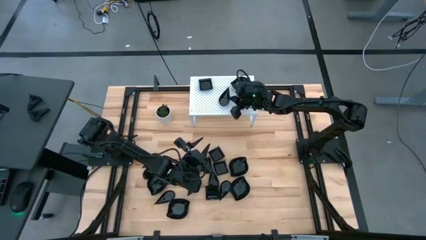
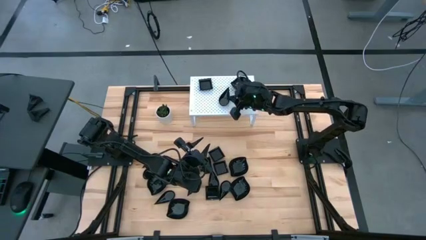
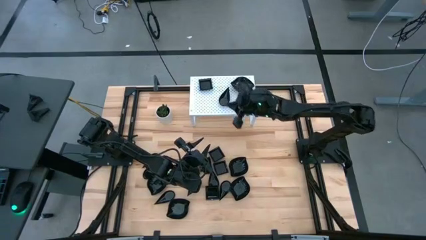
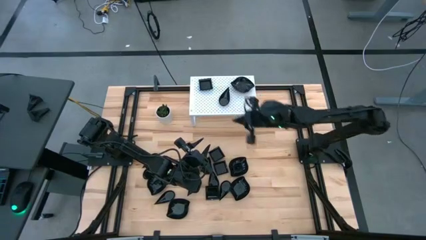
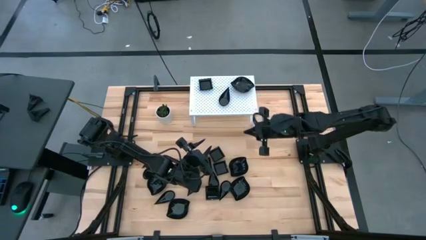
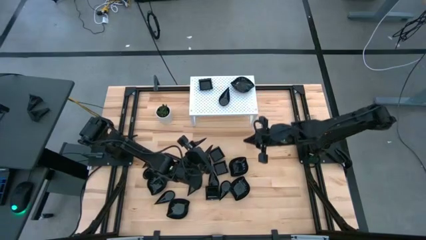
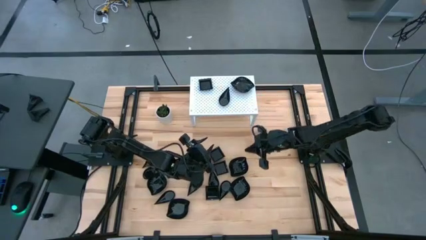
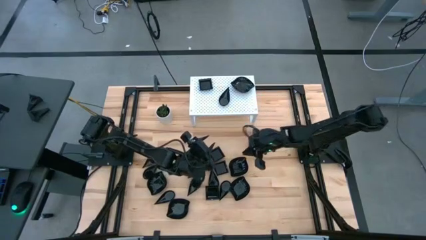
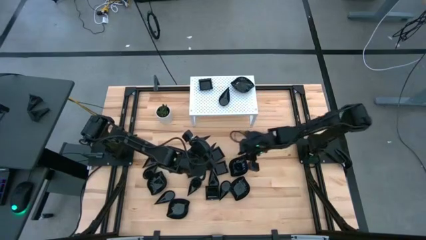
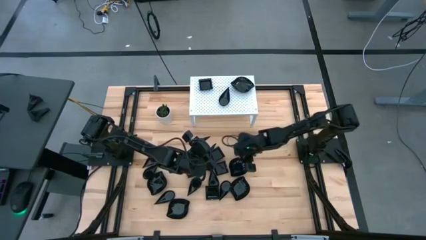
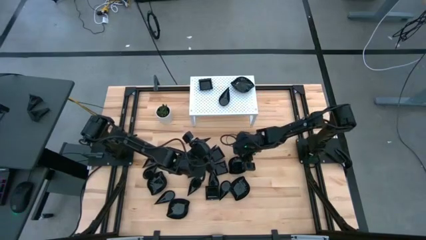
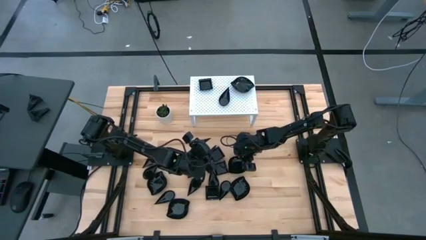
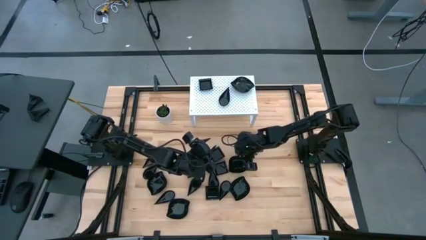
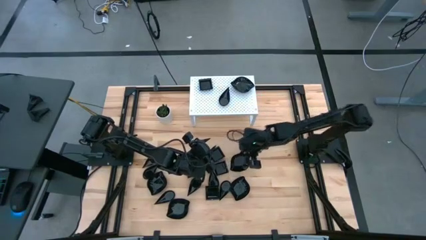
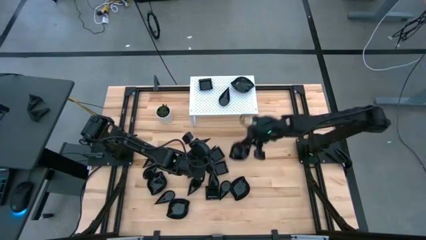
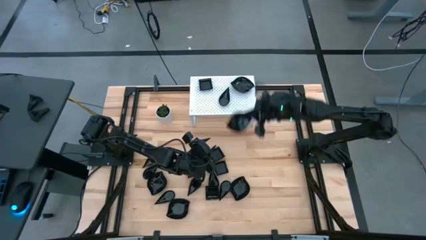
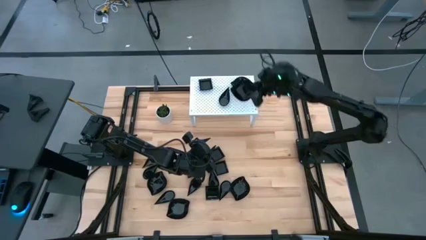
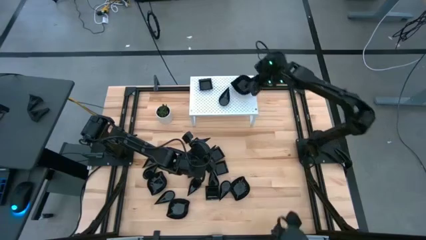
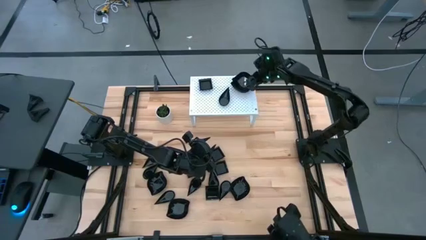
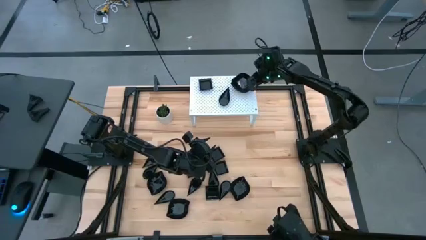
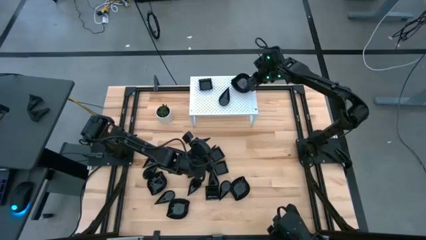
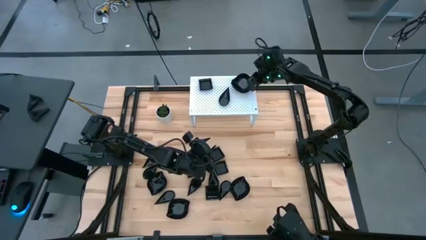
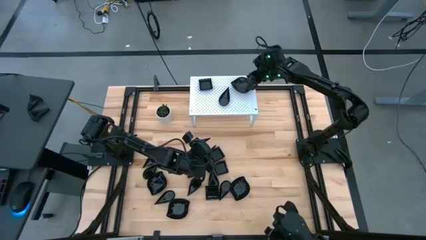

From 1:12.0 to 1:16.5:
Task: Pick & Place Mini shaped plates
Stack the black plate on top of the black plate on the shelf

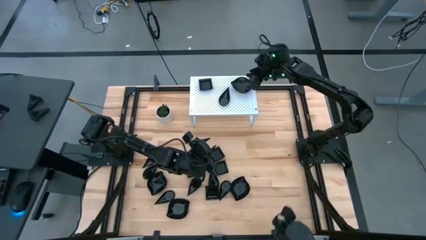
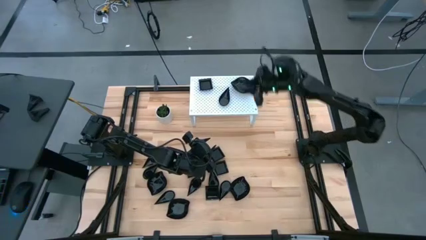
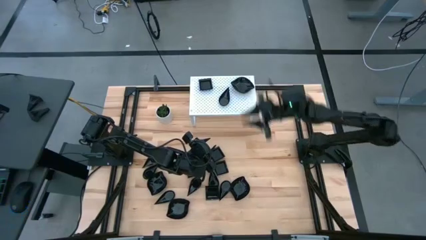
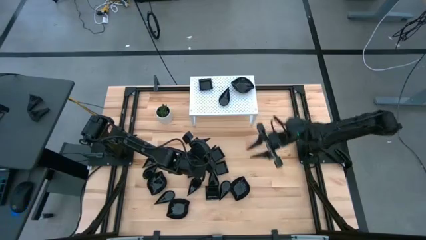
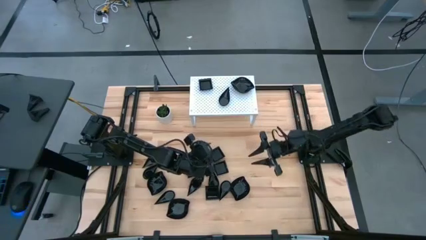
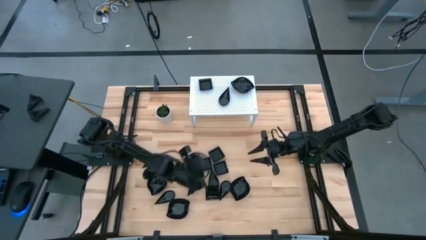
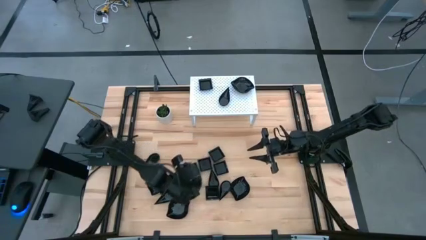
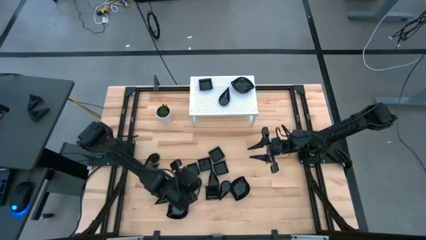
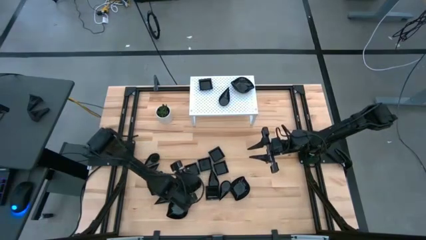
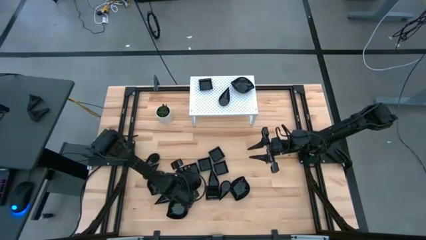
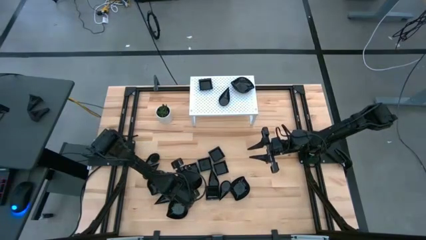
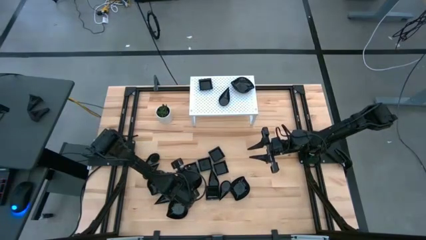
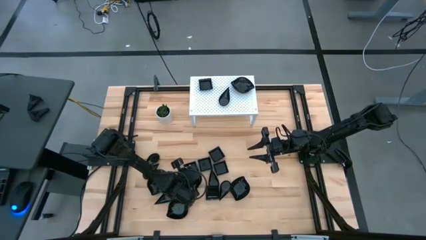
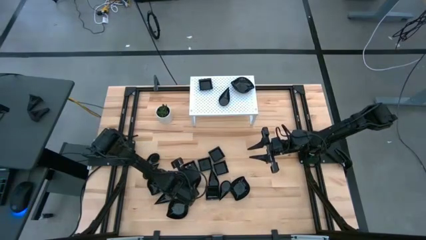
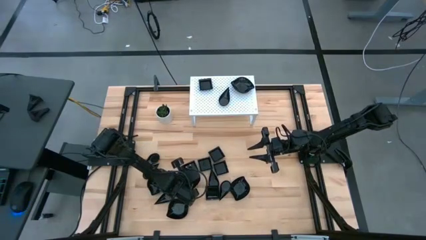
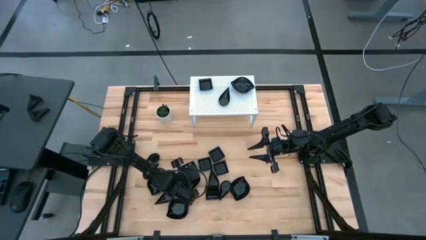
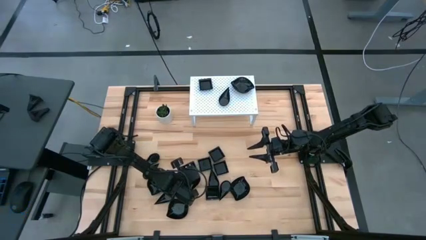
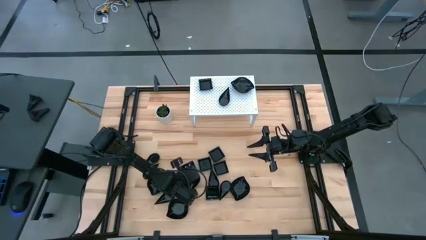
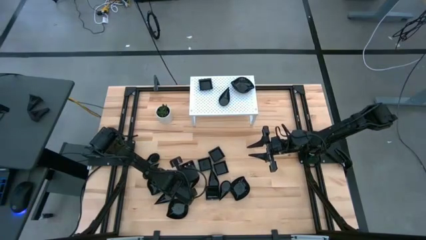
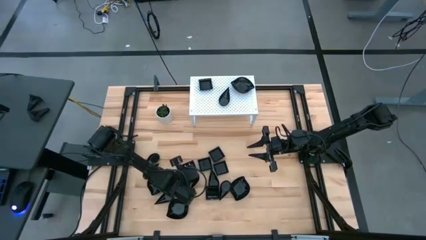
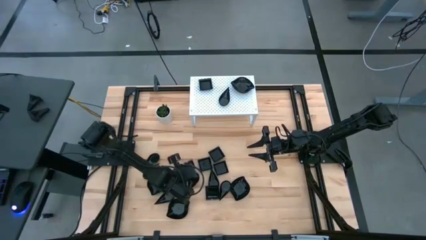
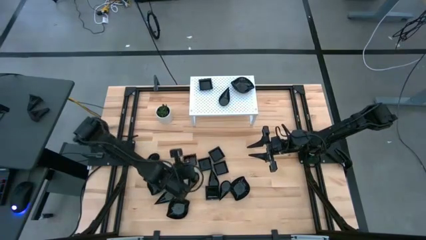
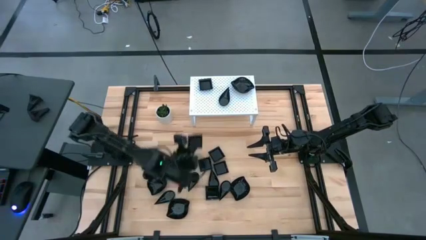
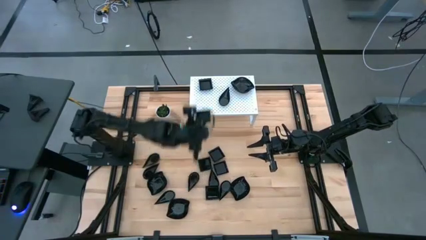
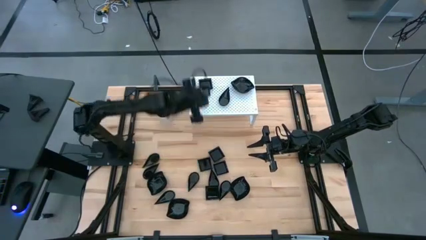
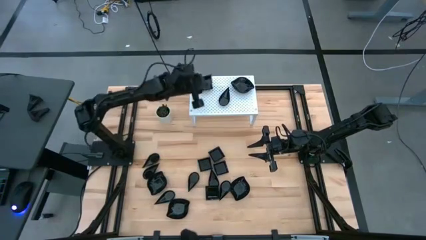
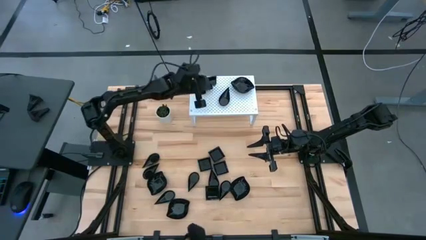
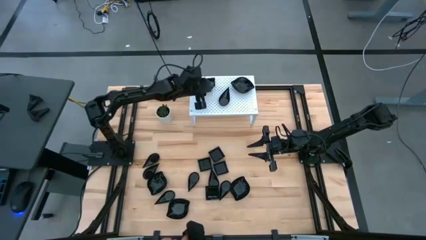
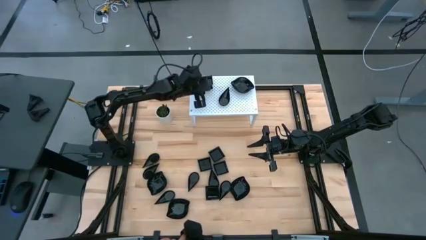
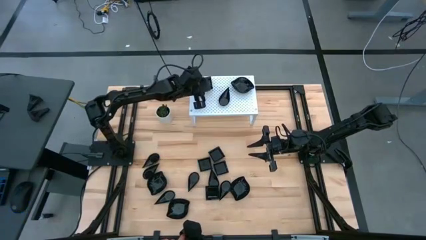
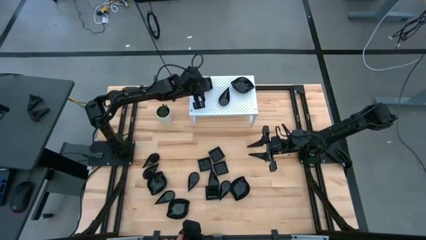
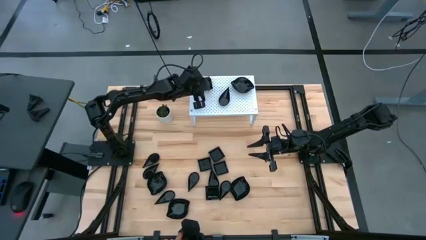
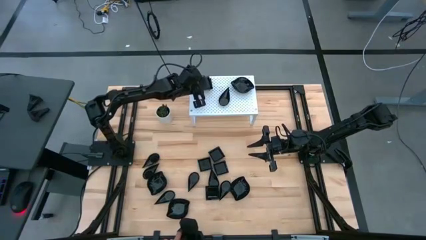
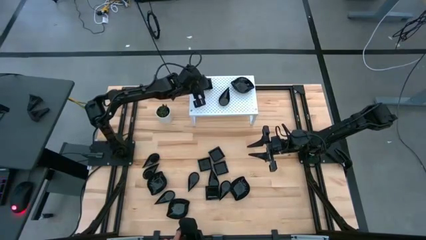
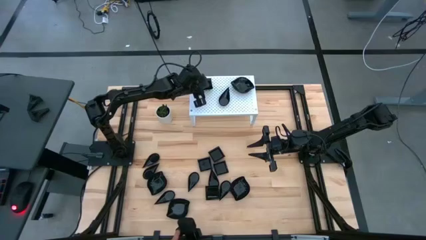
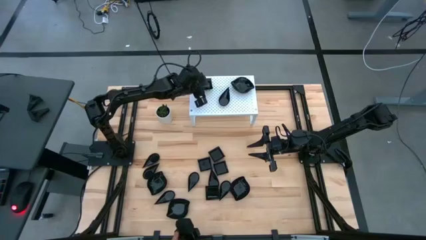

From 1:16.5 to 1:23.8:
Stack the black plate on top of the black plate on the shelf

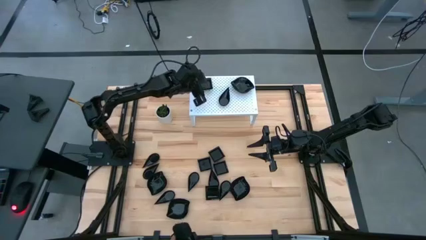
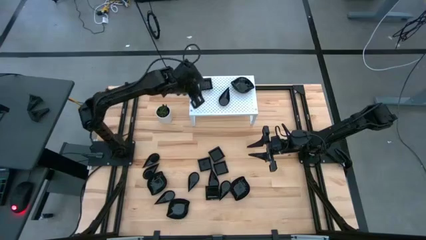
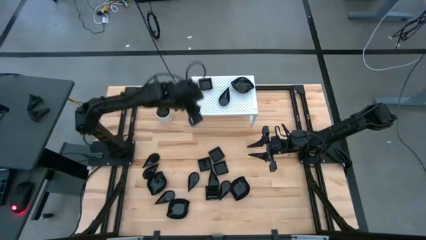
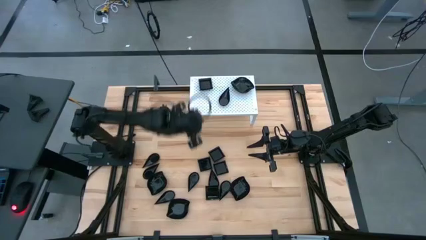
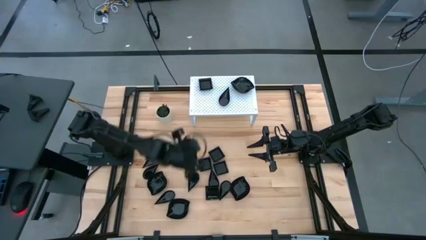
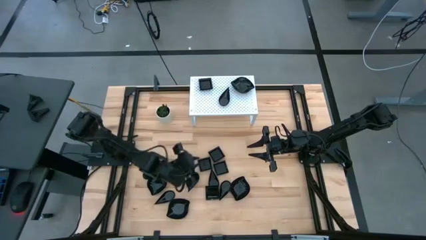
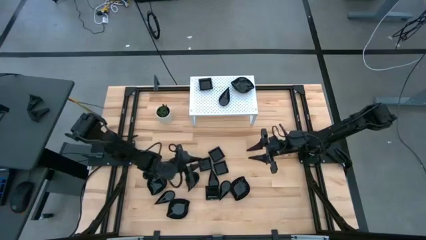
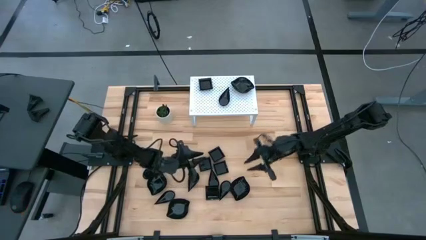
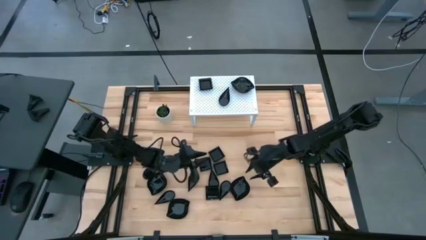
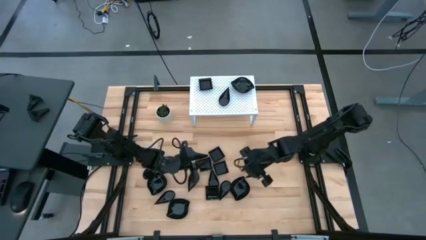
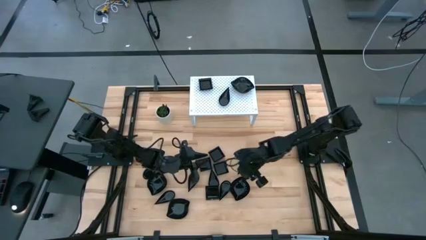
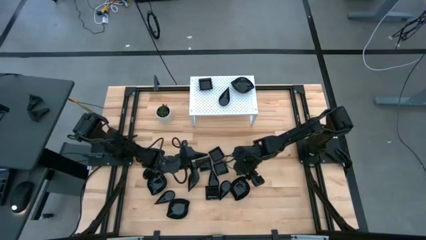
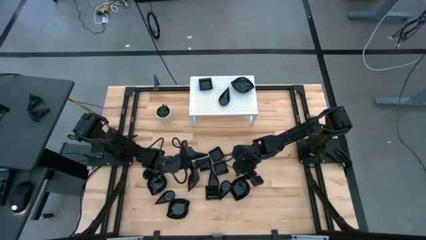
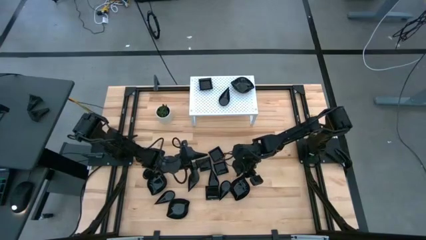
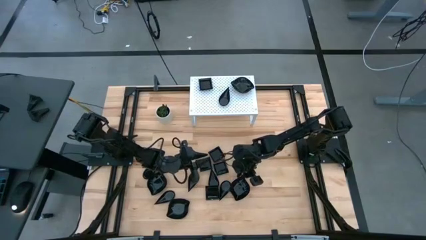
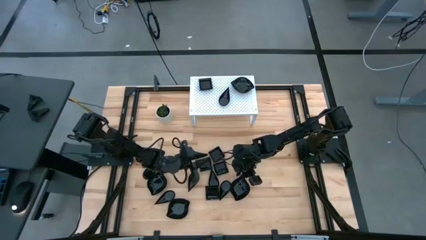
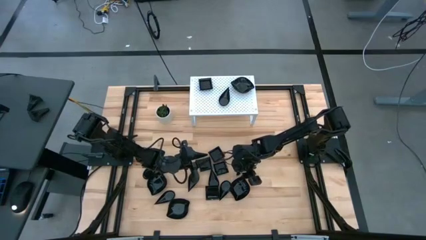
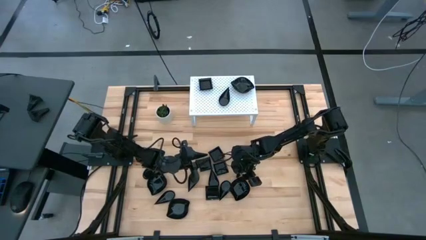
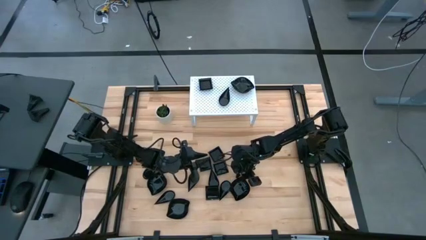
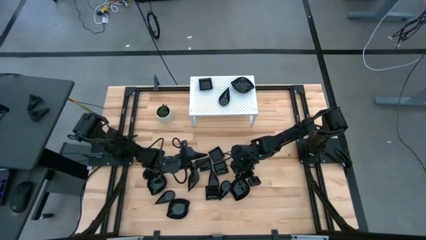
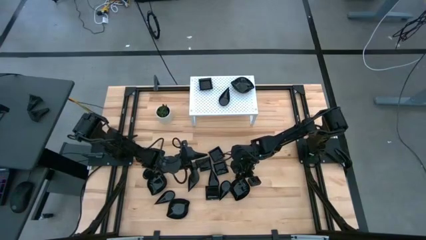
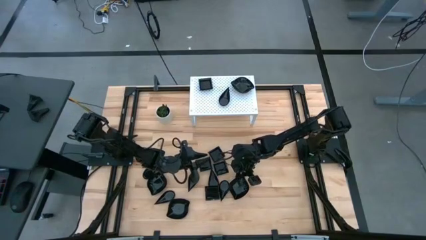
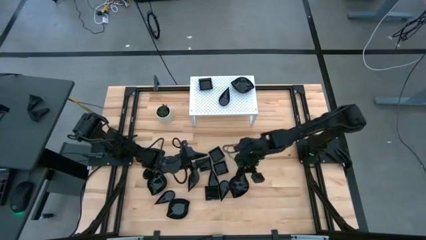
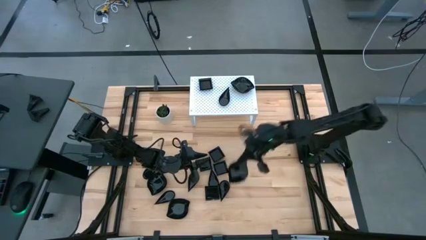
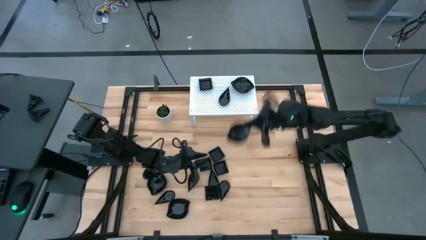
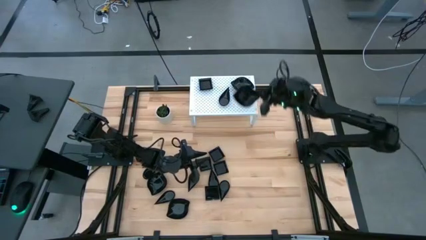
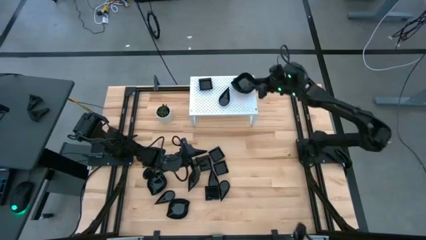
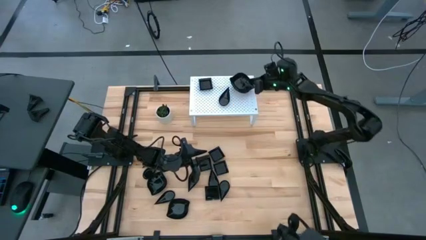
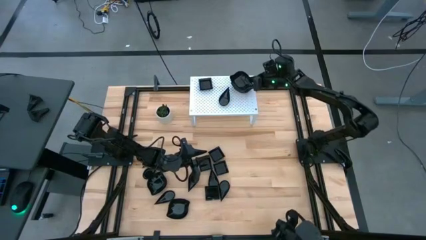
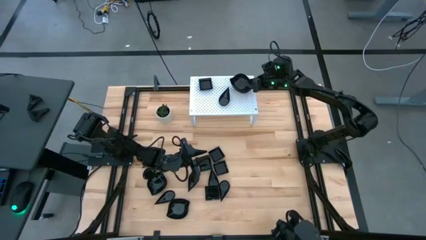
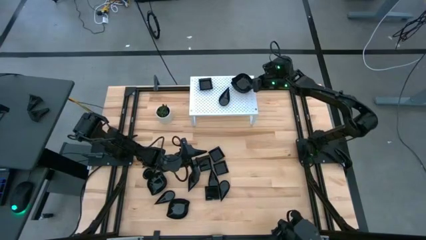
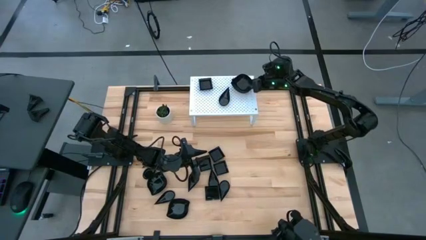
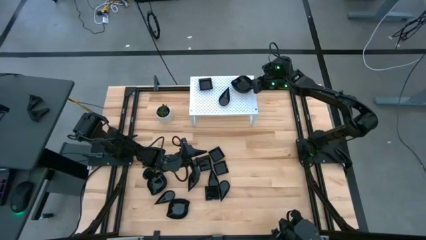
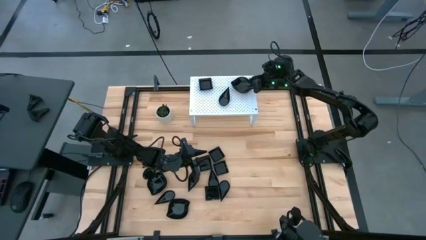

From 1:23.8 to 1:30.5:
Stack the black plate on top of the black plate on the shelf
